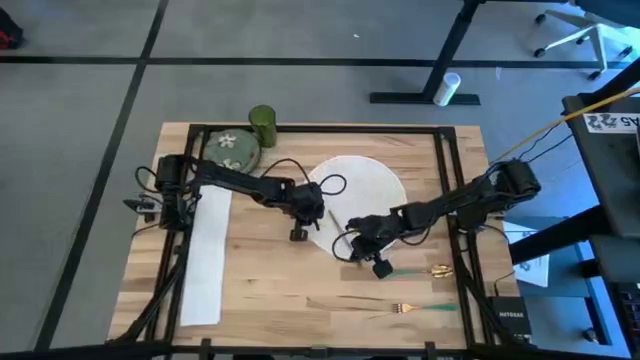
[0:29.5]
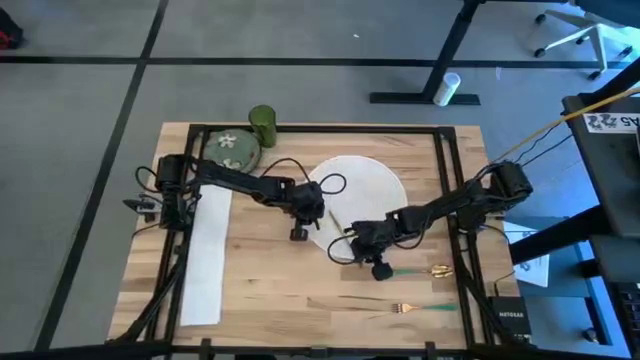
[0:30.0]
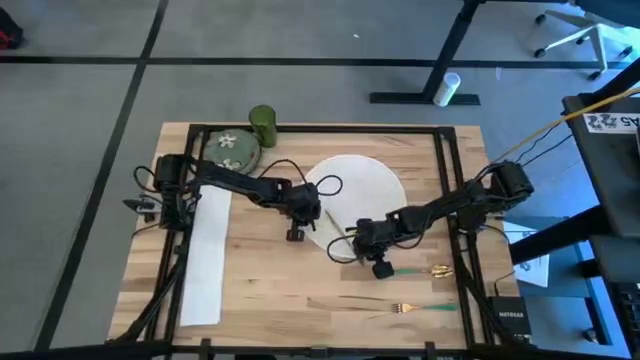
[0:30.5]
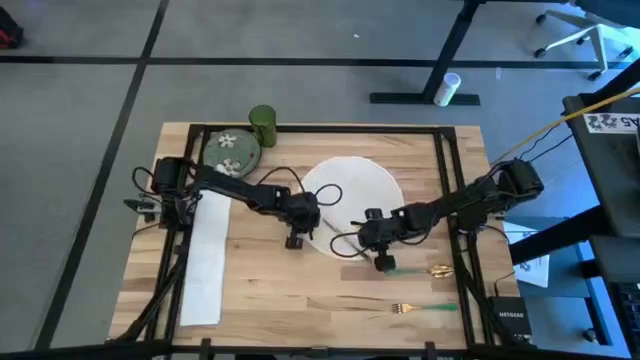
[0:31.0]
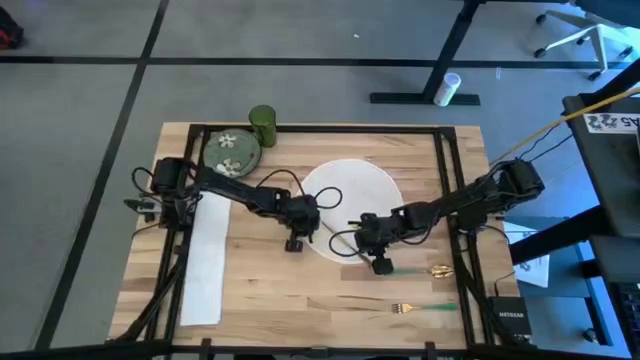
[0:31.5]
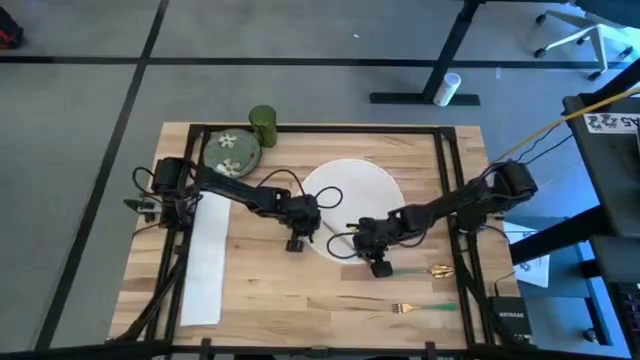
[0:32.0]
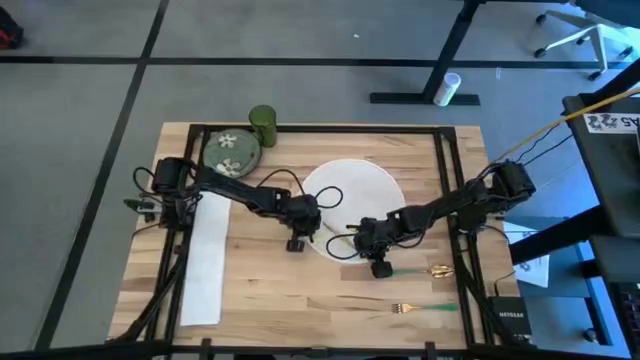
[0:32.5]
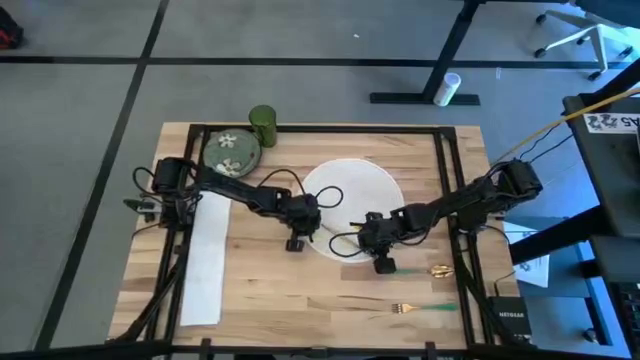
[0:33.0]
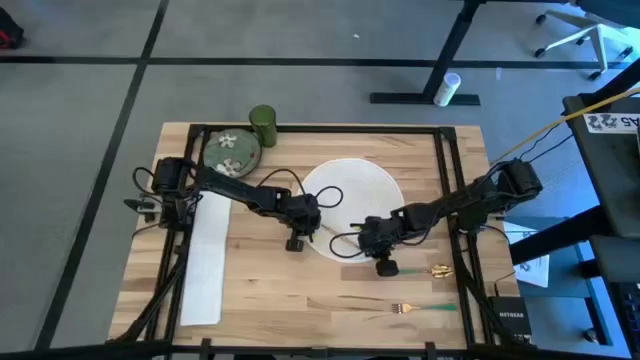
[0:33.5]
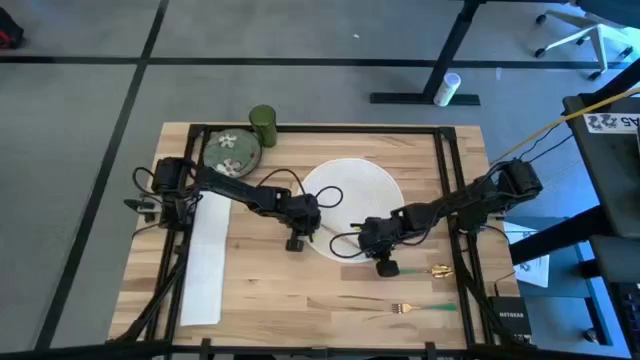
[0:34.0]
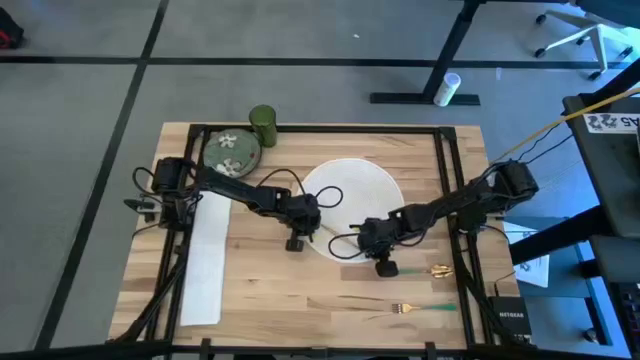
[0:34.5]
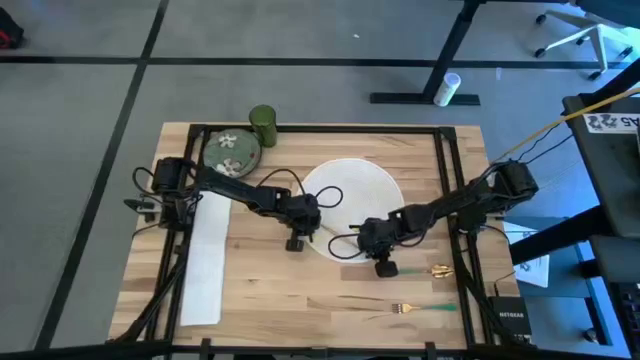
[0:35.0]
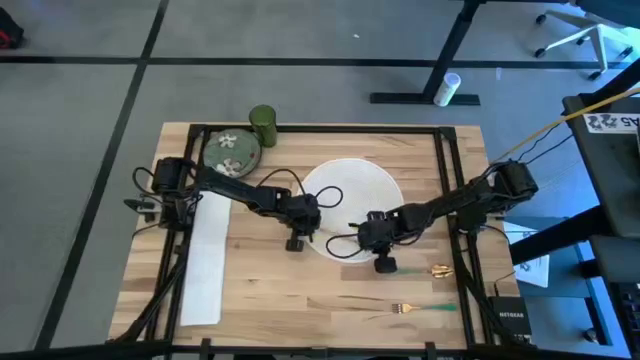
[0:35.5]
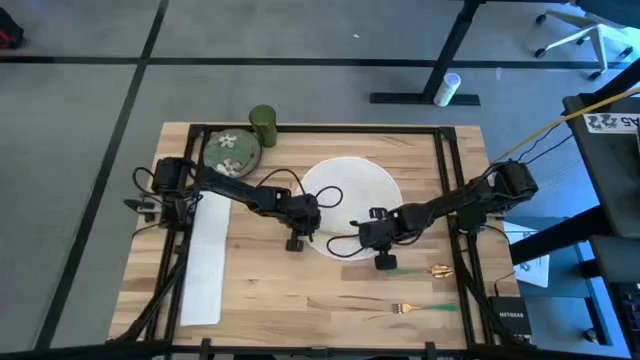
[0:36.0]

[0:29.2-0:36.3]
Task: Set table place
Put the gold table knife on the white table mat

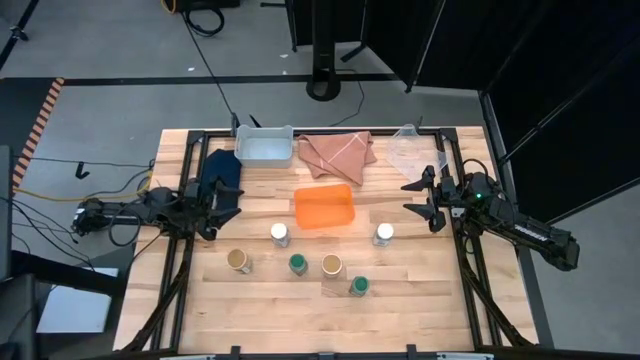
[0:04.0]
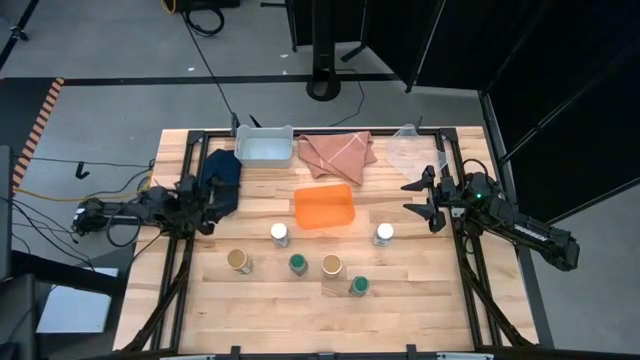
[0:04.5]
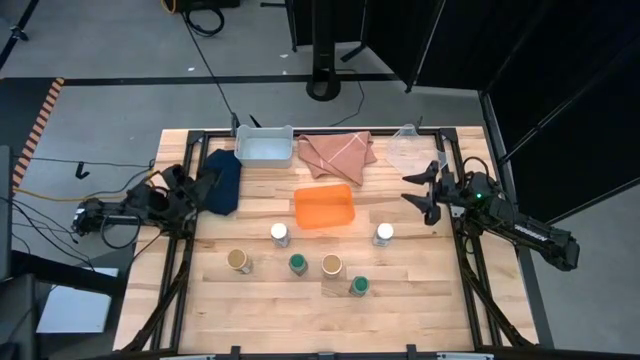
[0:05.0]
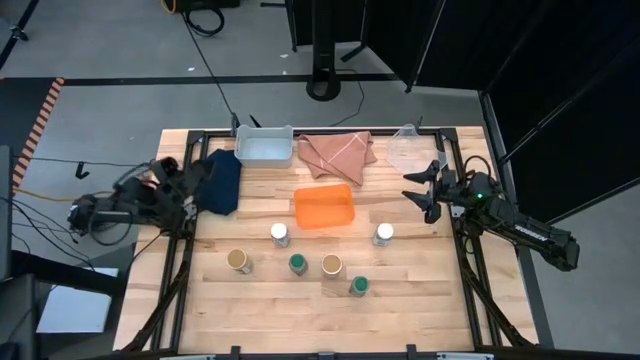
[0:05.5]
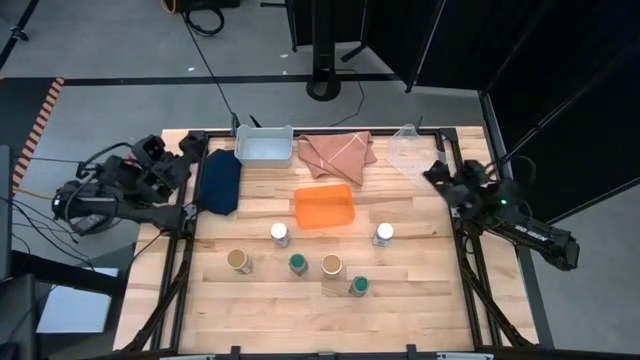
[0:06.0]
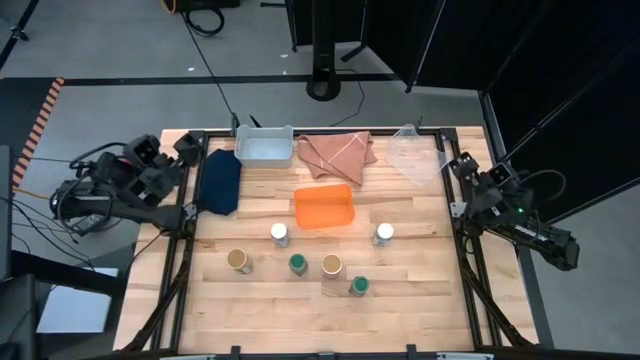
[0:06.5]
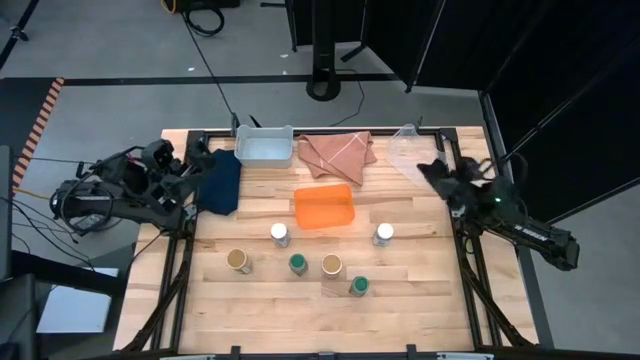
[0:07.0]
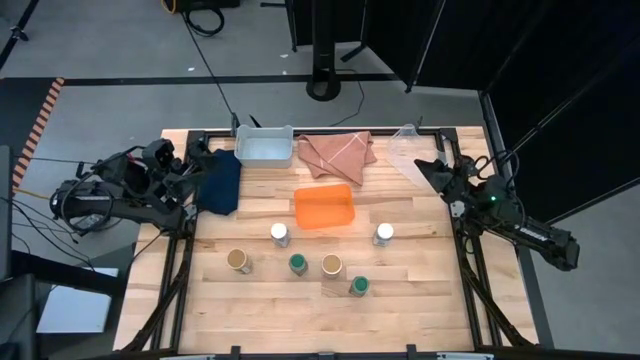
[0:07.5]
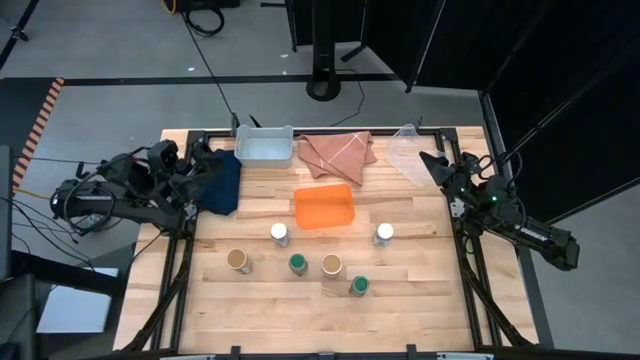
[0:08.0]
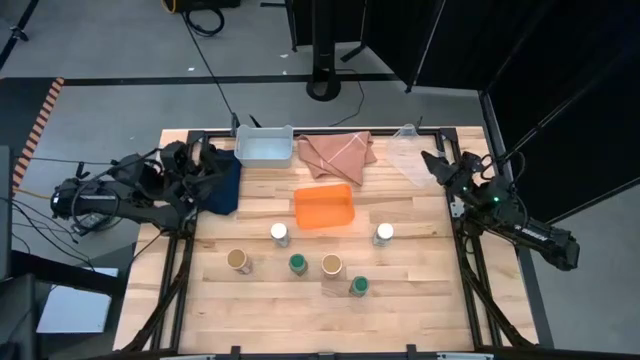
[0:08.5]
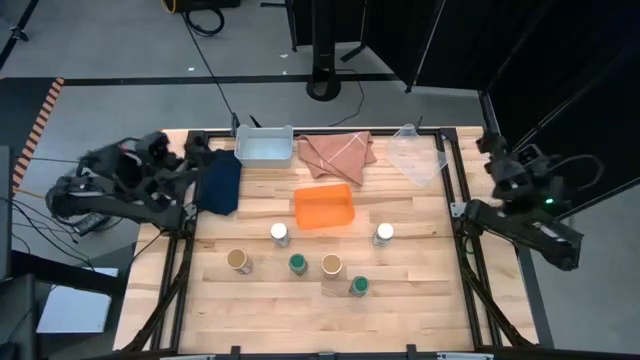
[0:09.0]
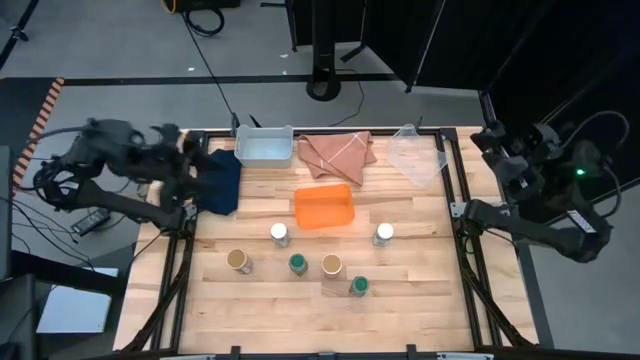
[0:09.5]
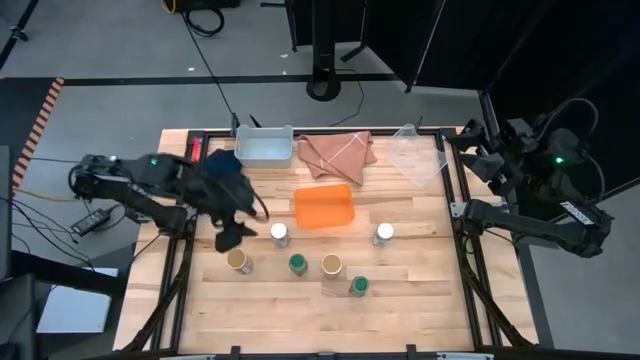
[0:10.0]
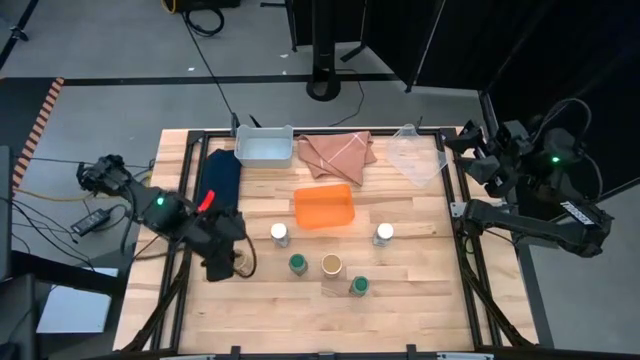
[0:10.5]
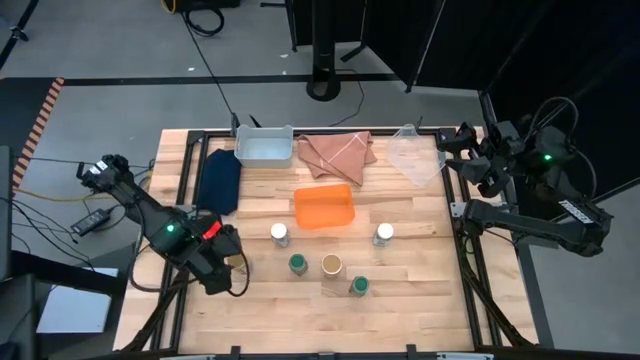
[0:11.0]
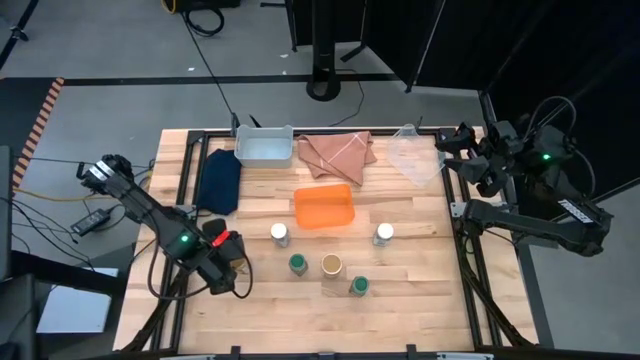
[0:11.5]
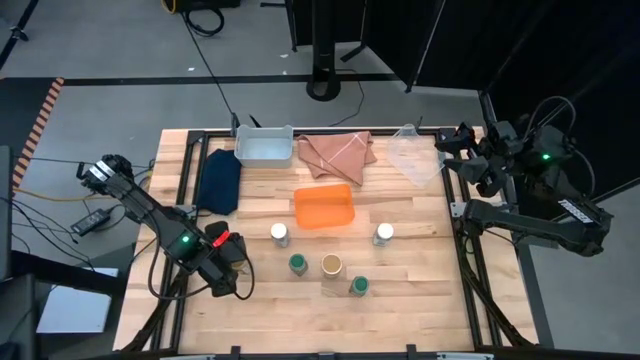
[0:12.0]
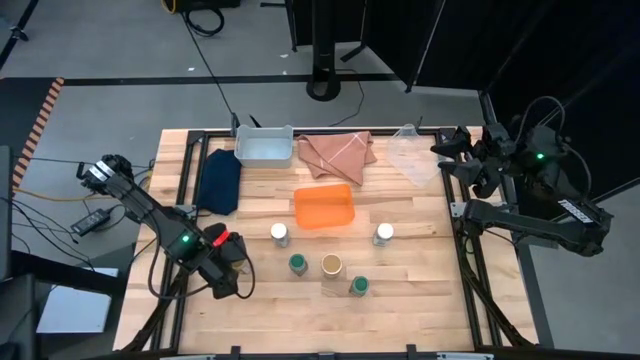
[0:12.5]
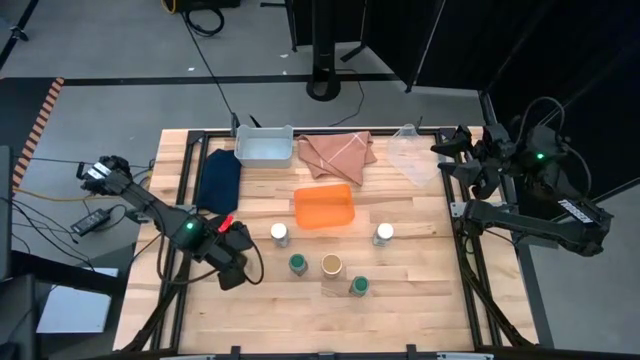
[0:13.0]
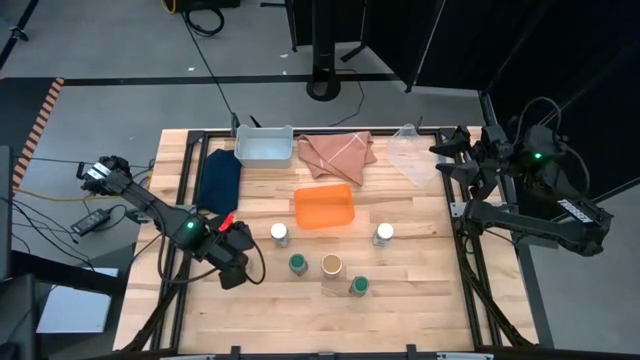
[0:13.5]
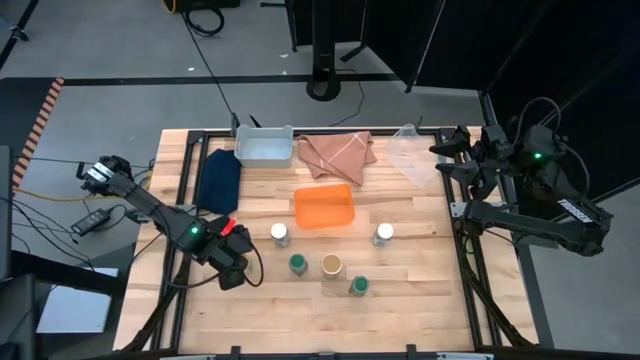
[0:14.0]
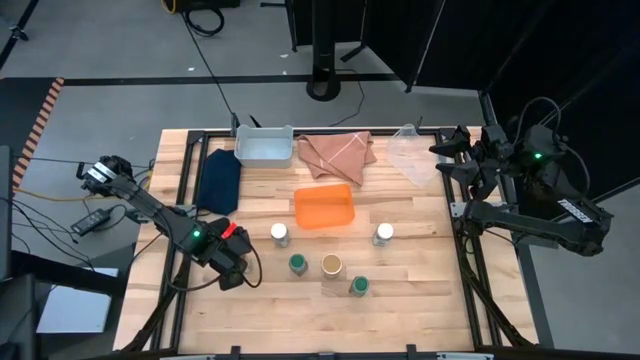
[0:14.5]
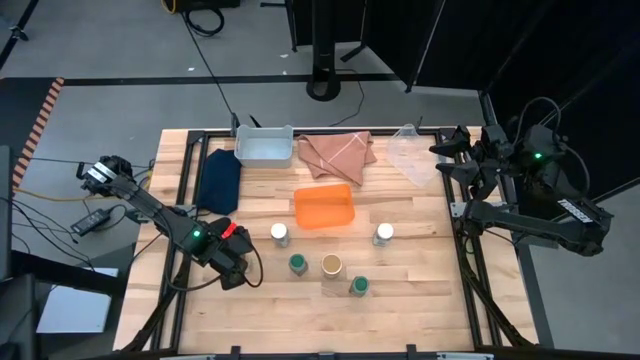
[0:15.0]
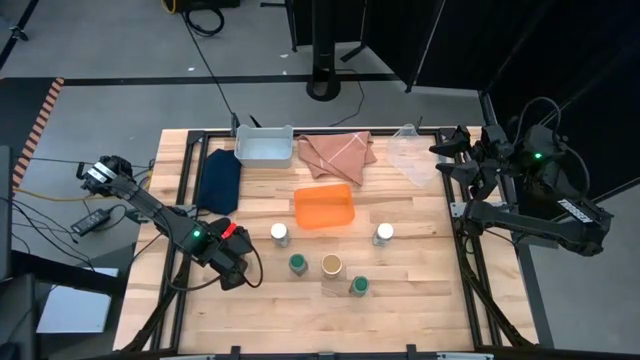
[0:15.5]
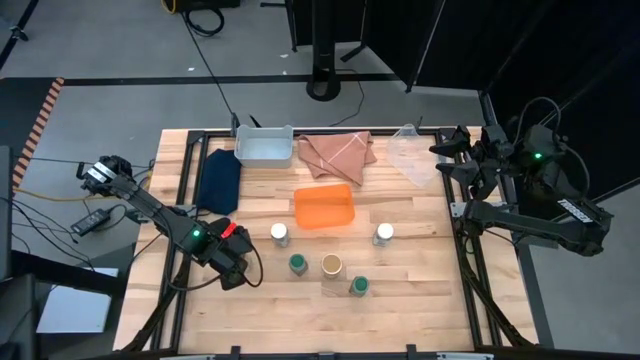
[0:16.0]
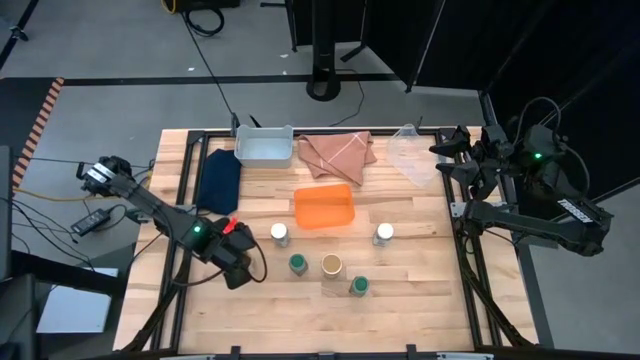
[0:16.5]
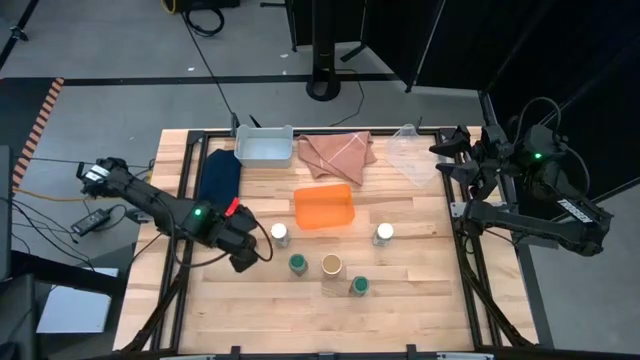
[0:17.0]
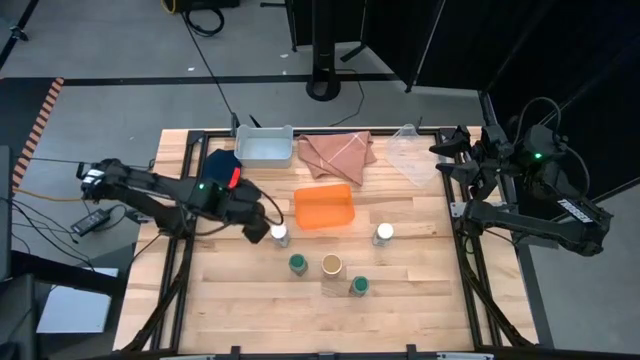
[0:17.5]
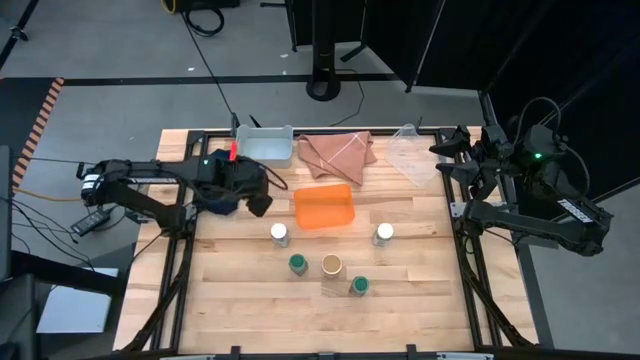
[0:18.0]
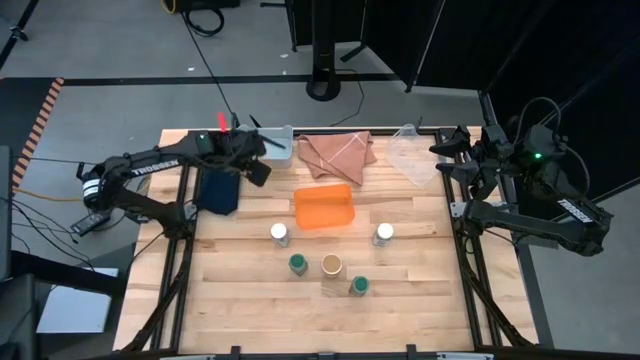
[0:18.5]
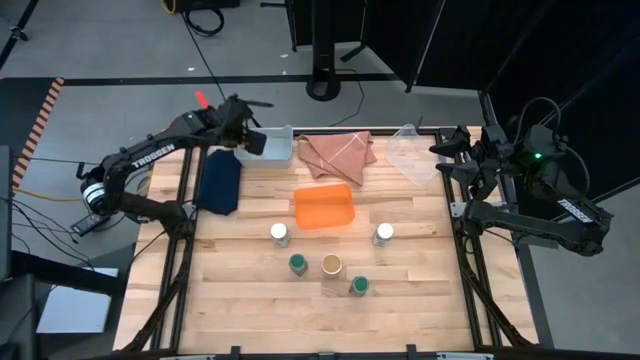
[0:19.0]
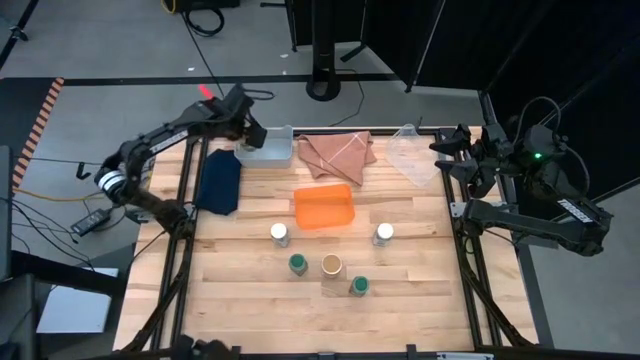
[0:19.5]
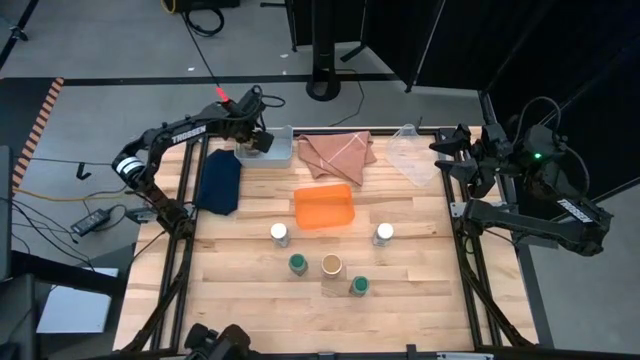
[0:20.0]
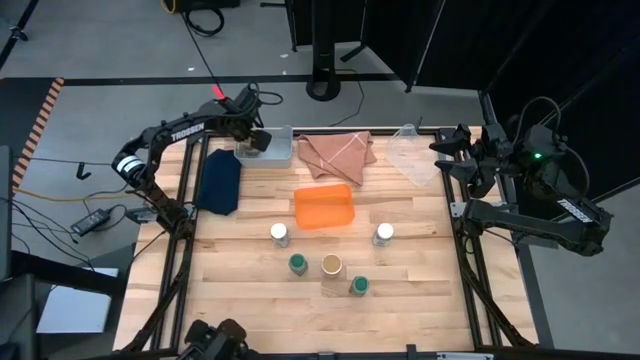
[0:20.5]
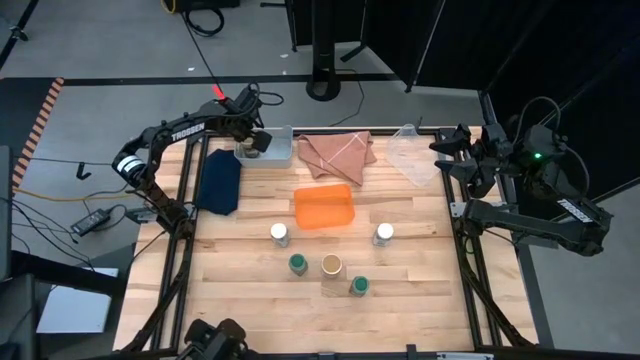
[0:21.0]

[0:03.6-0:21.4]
Task: Sort spices by type
Put the gold seasoning bottle into the gray bin
